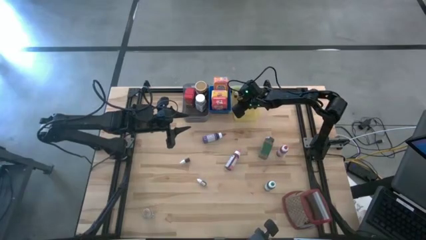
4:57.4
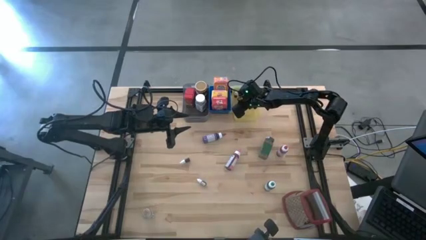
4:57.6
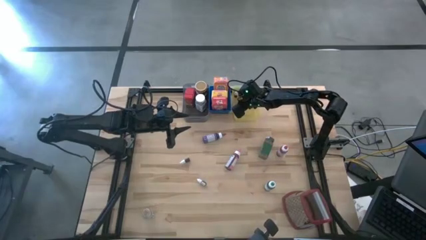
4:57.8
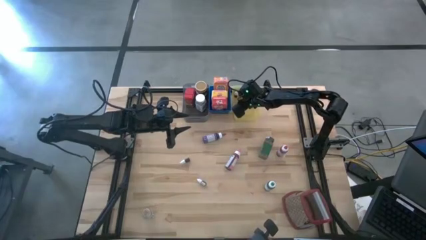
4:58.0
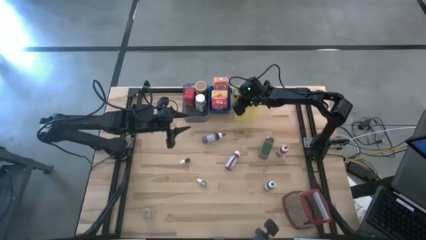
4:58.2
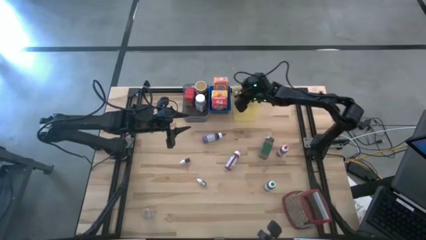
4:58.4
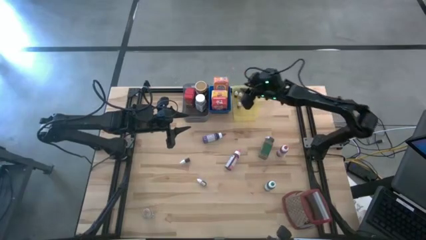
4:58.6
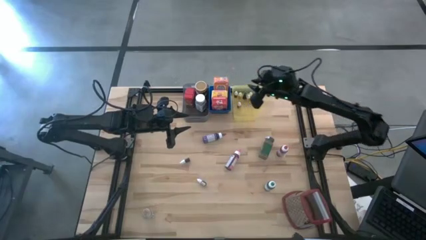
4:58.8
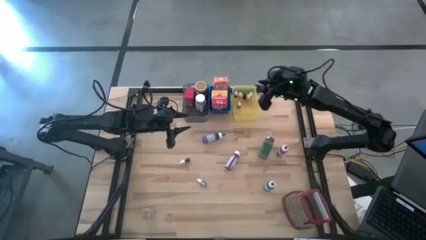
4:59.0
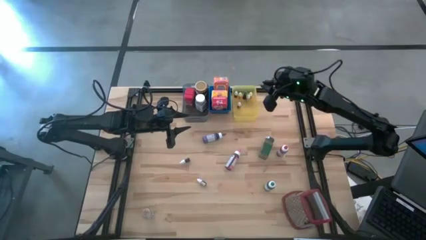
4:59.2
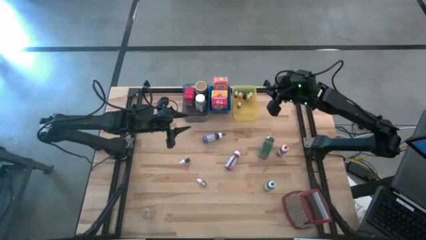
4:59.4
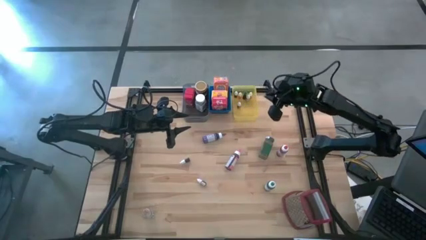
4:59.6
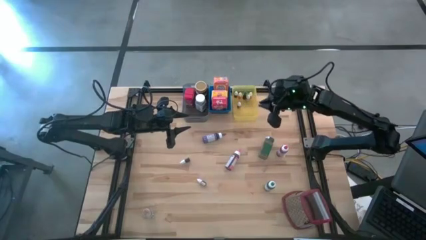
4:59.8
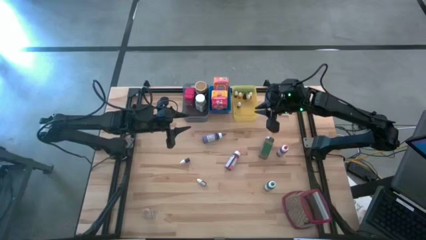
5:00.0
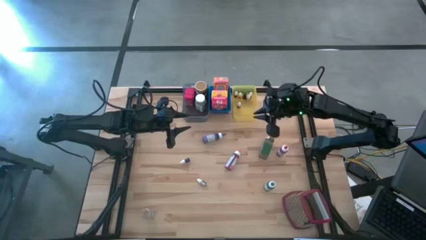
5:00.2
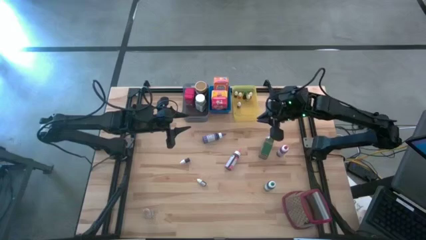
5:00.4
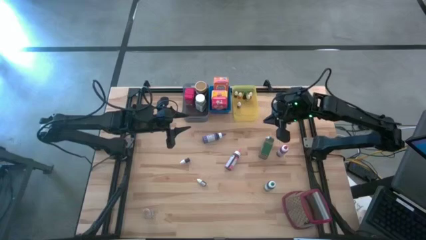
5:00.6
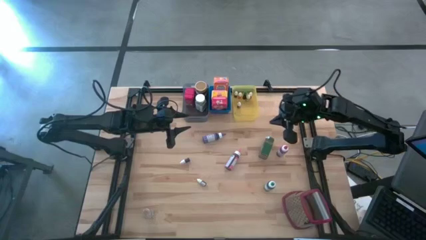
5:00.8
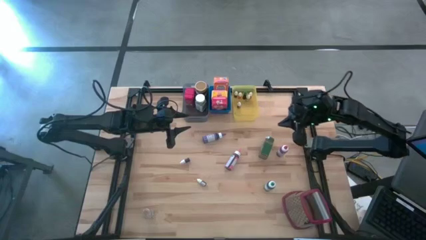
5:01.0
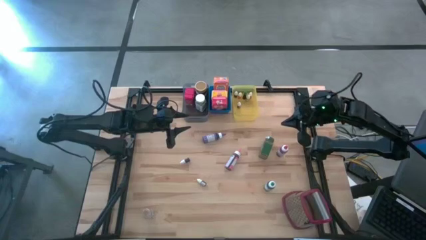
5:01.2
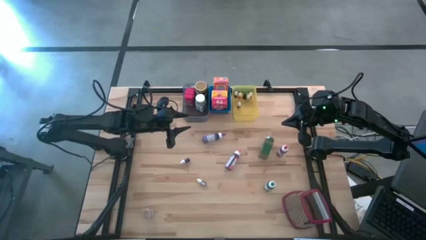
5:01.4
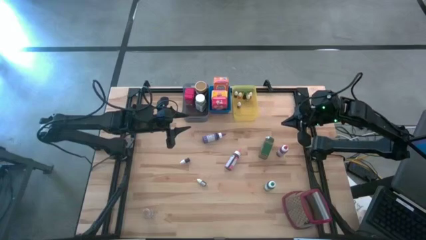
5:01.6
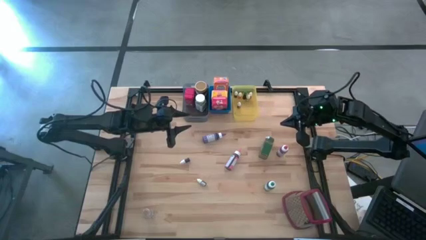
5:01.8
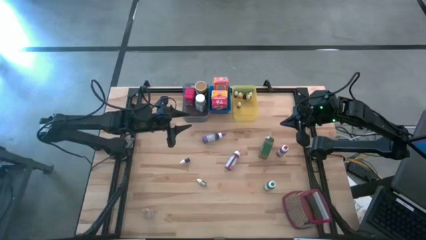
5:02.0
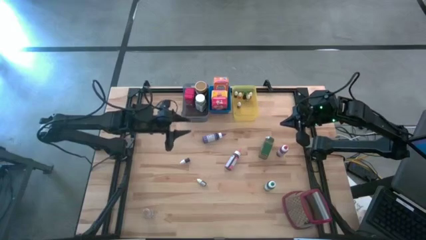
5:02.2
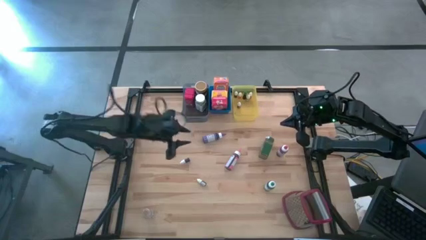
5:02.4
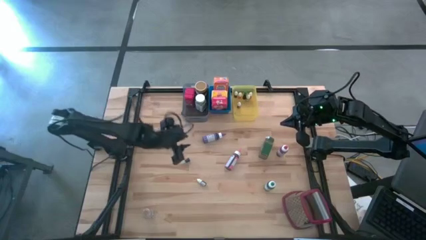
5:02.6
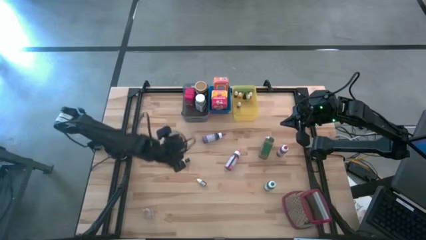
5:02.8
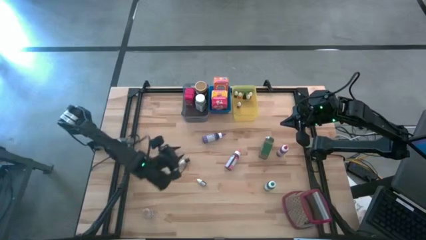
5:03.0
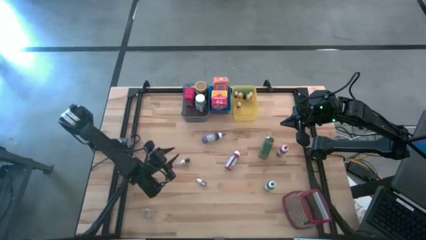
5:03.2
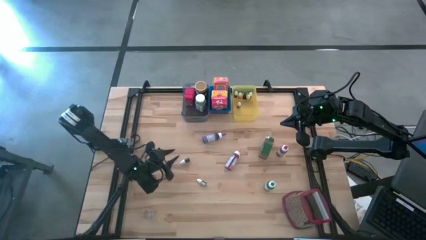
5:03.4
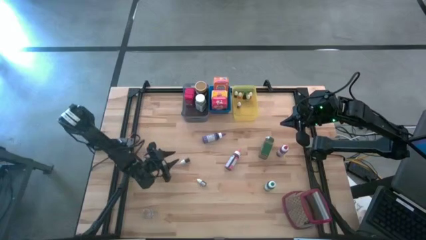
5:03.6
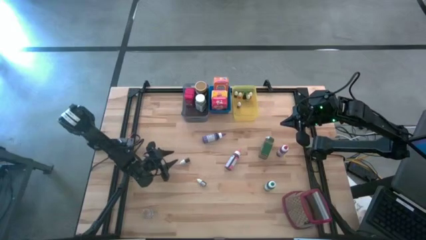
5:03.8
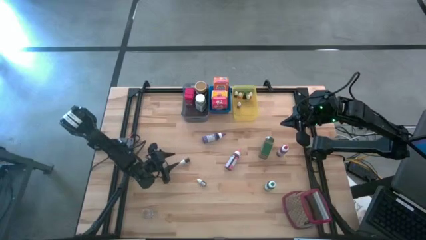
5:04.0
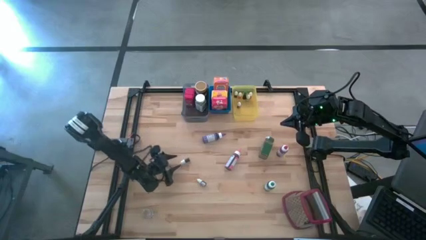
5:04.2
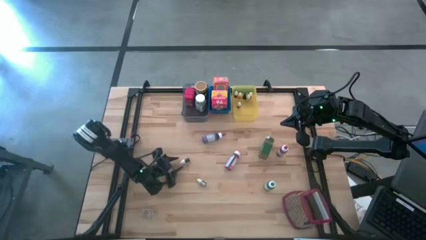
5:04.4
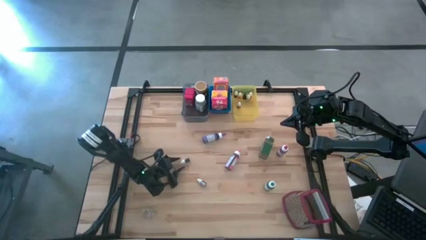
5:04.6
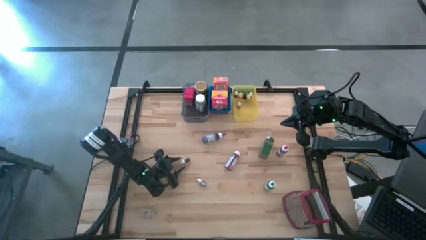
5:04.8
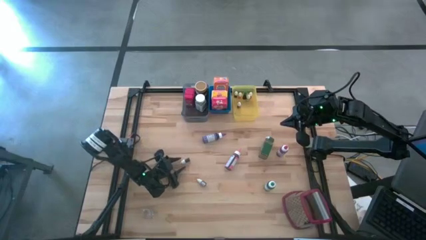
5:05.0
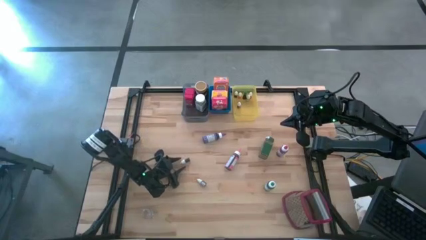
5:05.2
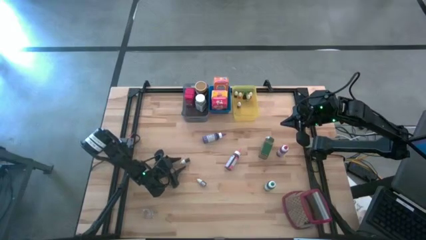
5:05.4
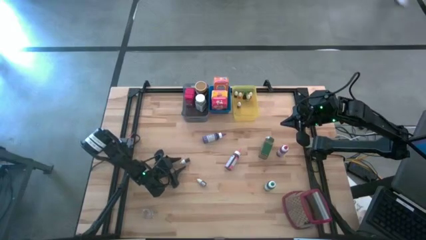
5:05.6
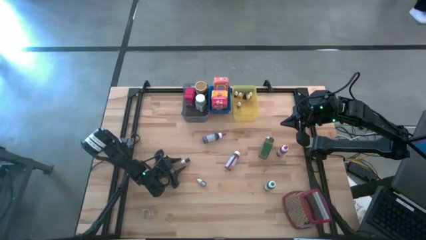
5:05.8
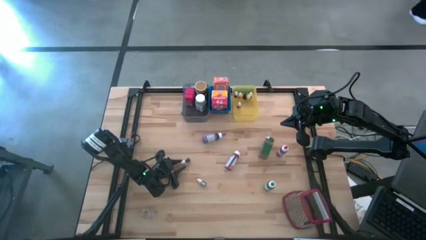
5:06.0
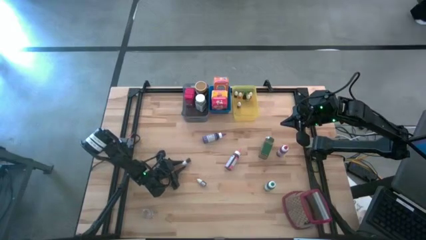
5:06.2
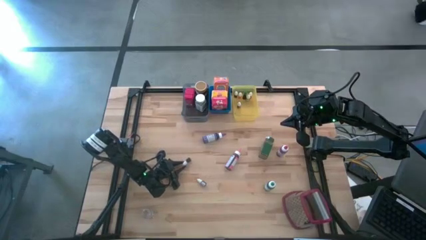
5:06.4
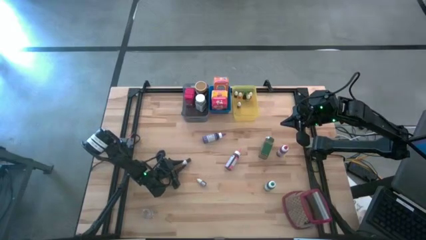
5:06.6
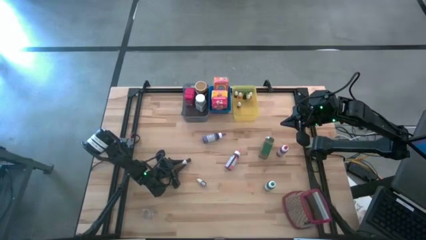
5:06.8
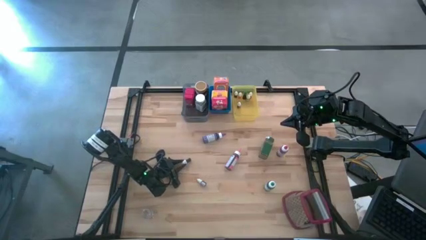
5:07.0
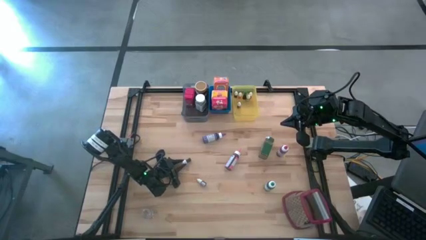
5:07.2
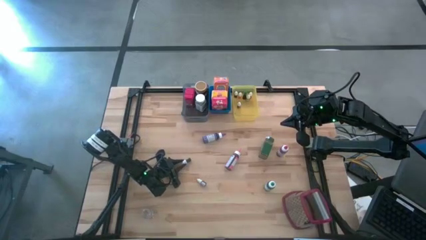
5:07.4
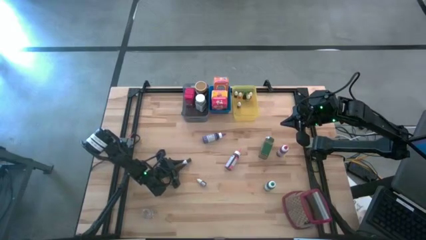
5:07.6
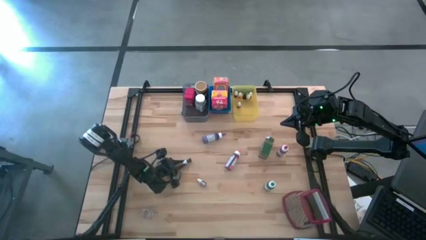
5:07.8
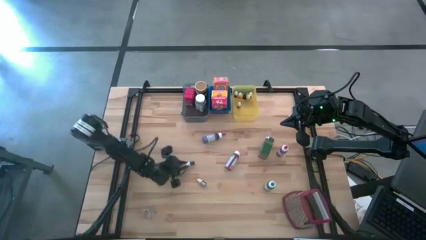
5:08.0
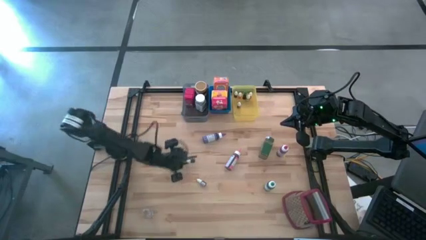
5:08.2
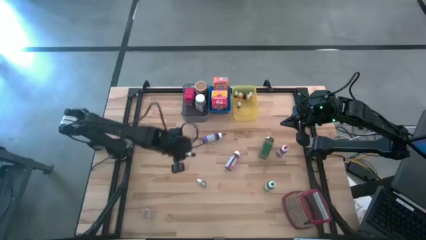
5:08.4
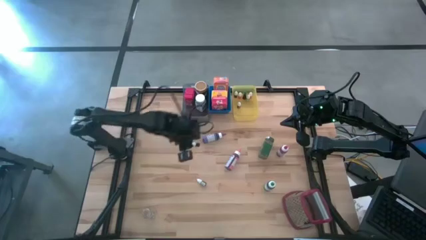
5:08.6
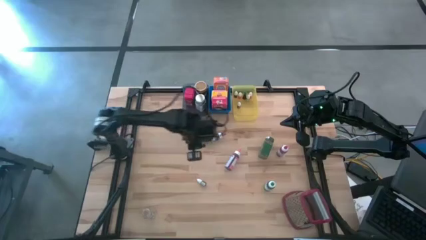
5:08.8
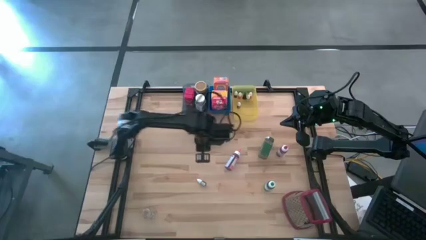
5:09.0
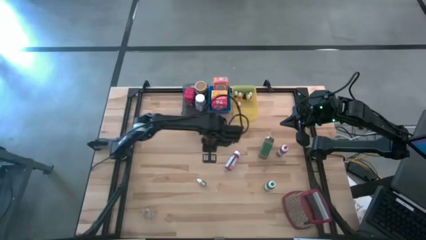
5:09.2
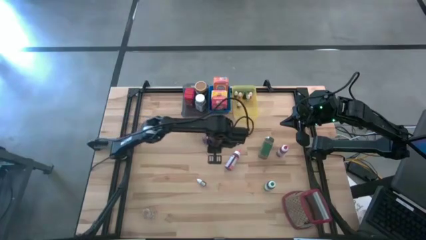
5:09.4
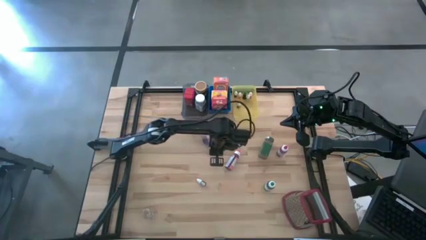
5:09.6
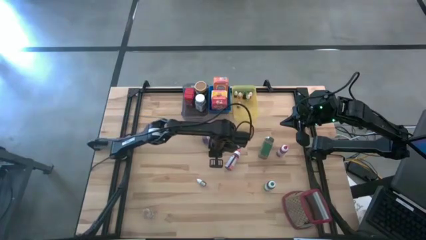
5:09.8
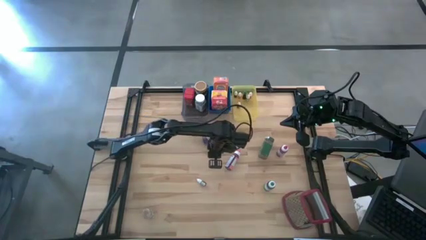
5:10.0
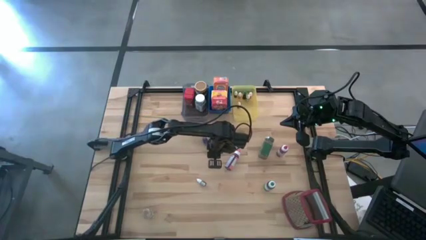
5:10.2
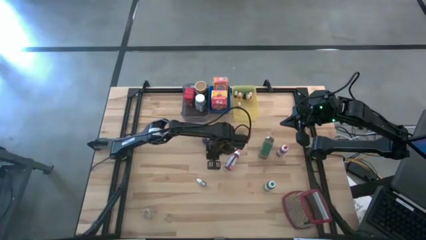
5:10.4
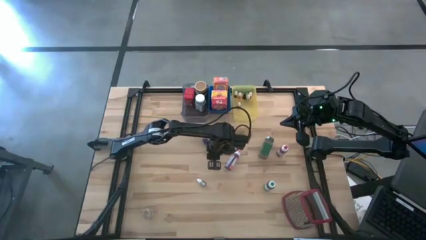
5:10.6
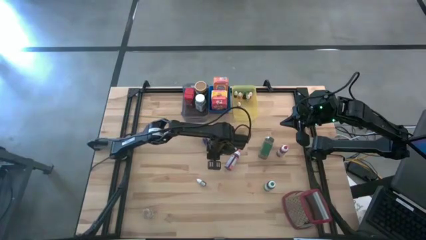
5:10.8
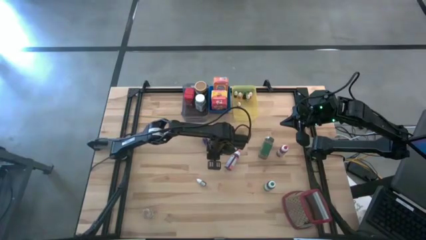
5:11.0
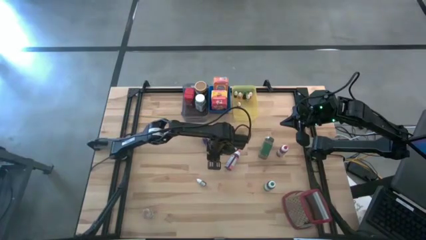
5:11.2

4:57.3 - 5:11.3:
Task: Pick & Place Kitchen Items
Move the black food coloring bottle to the center of the table

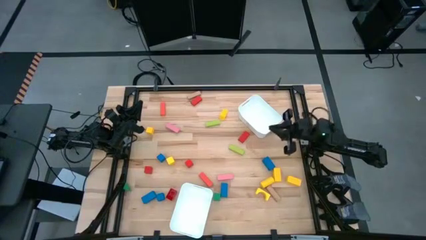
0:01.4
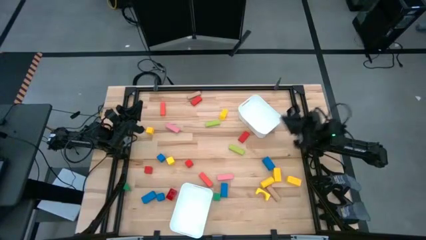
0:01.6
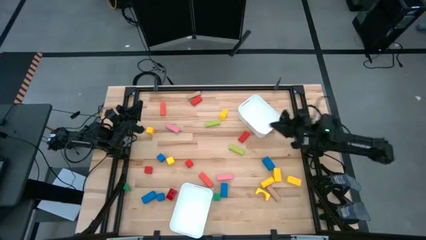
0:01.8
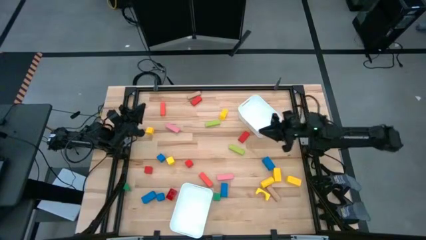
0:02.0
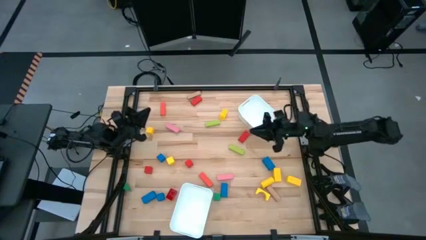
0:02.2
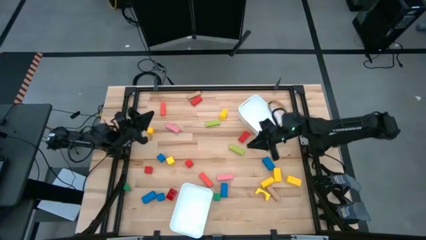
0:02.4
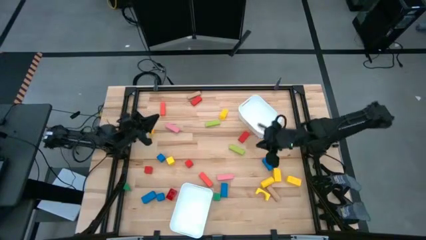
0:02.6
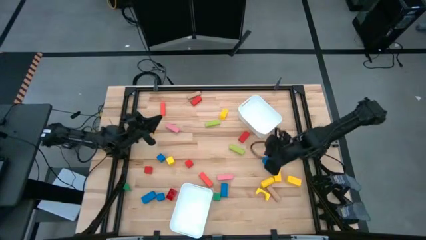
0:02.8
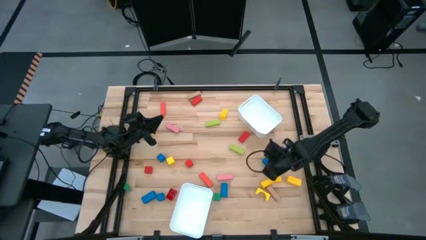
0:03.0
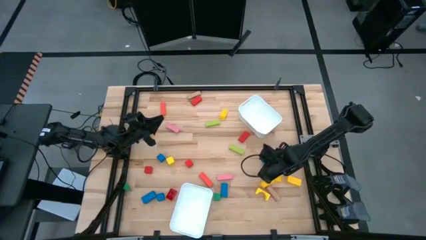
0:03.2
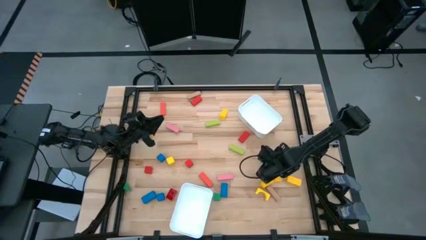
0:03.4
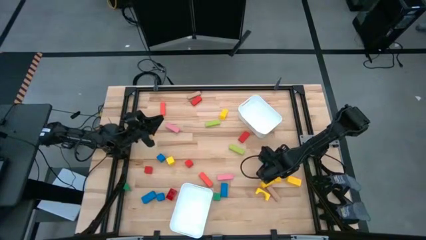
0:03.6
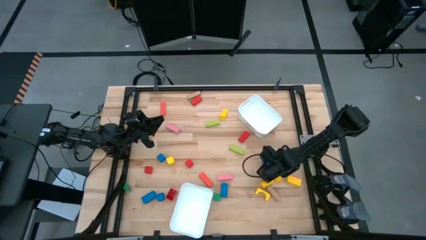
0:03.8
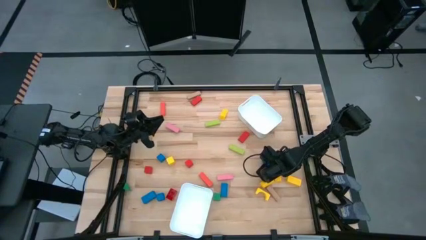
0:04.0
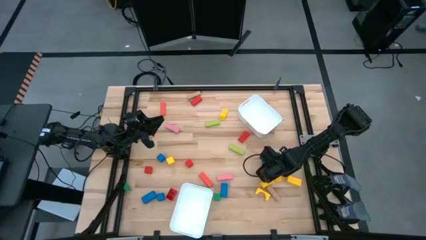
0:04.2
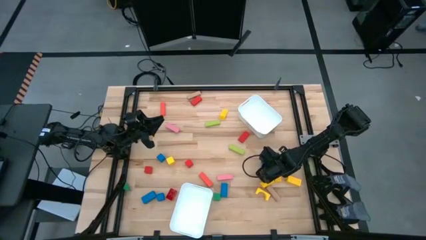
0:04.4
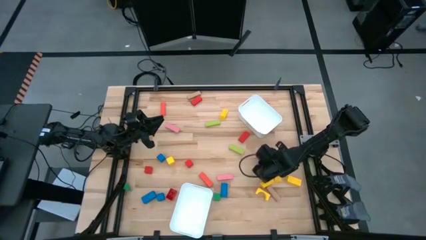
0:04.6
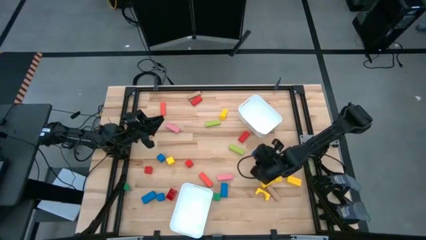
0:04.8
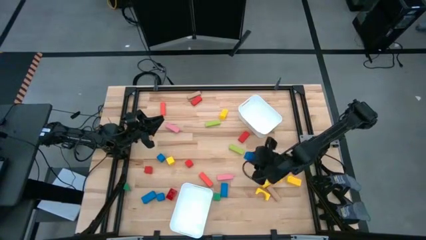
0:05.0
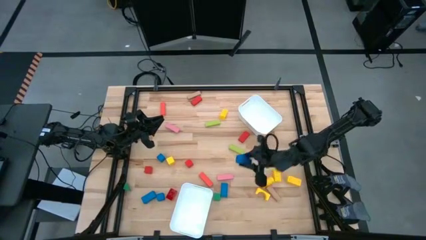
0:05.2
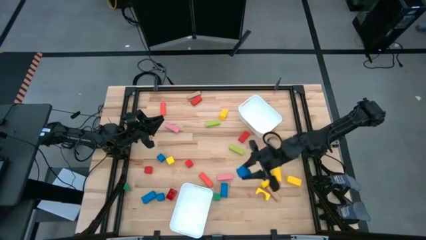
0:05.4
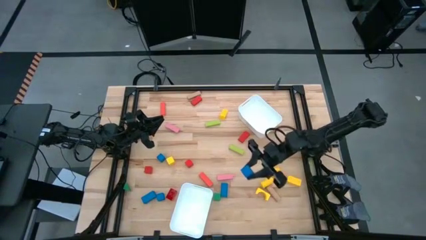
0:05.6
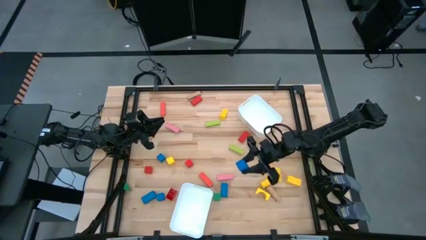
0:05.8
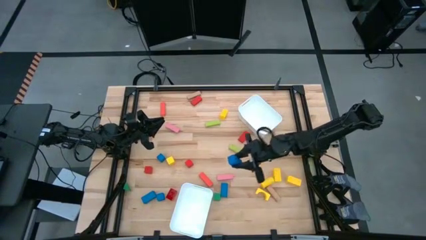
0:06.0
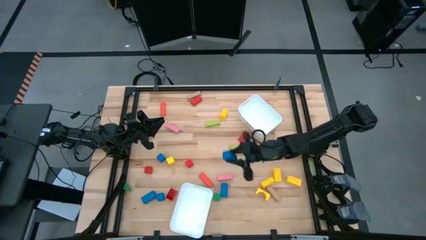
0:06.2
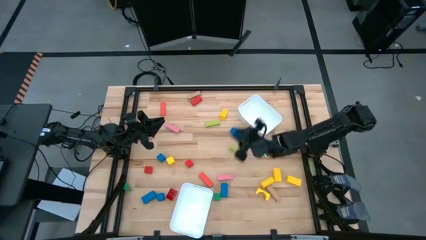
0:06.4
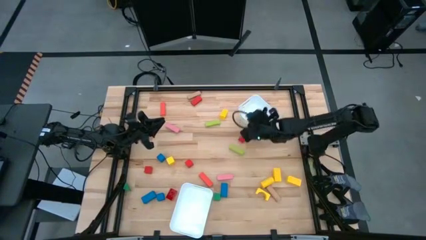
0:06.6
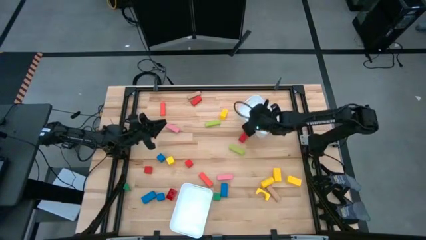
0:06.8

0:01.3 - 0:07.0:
Task: Sort blocks by size
Put the blue rectangle block into the top white bin
